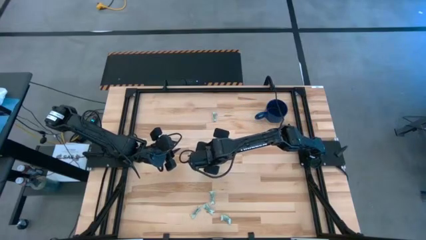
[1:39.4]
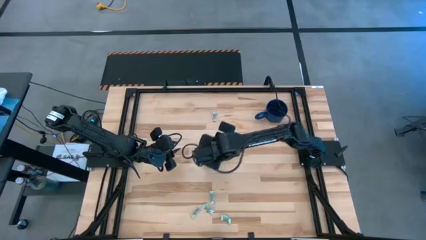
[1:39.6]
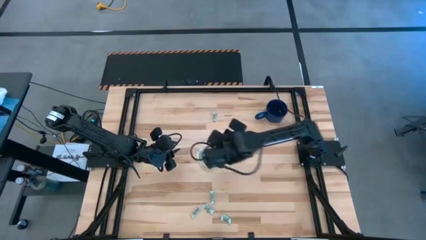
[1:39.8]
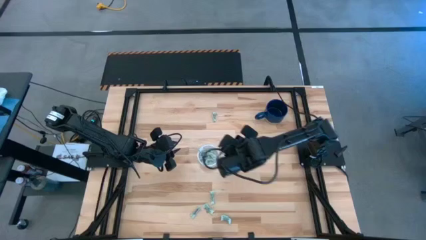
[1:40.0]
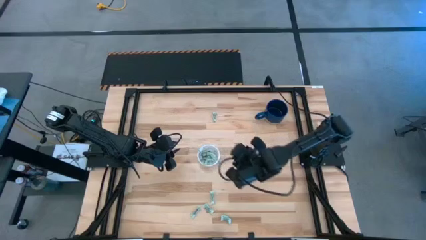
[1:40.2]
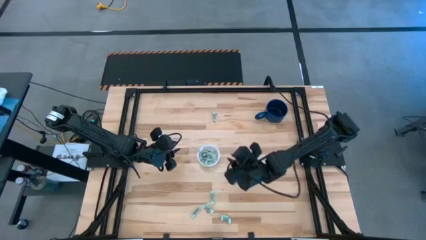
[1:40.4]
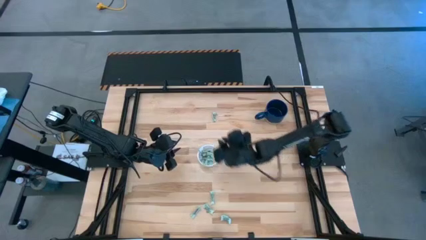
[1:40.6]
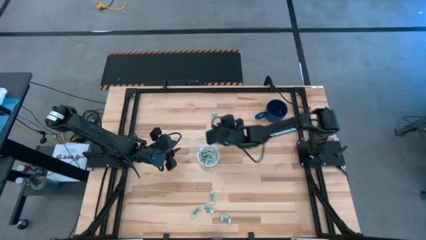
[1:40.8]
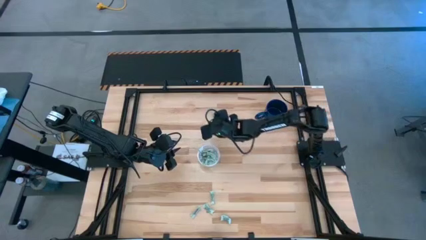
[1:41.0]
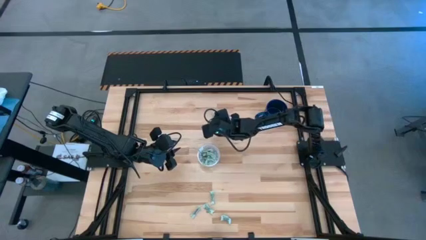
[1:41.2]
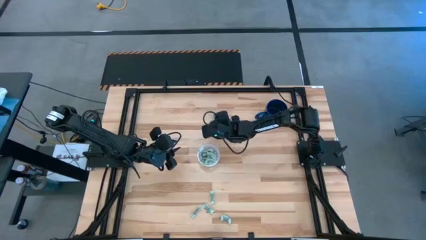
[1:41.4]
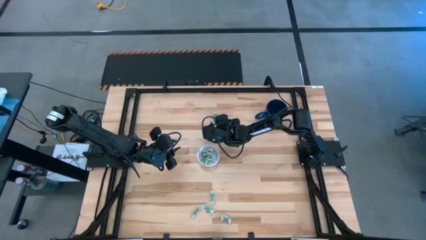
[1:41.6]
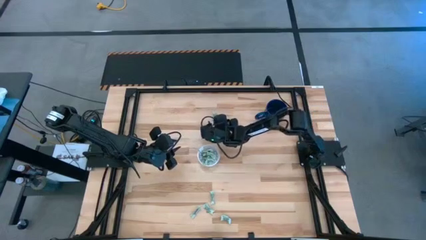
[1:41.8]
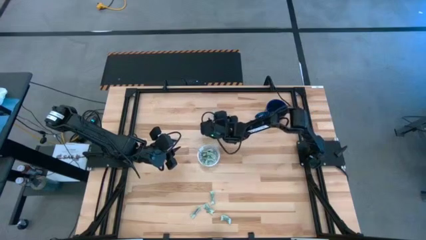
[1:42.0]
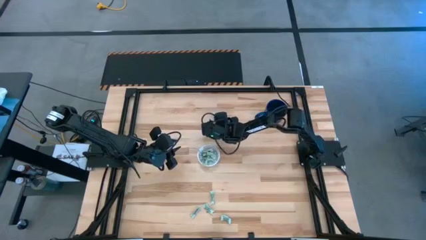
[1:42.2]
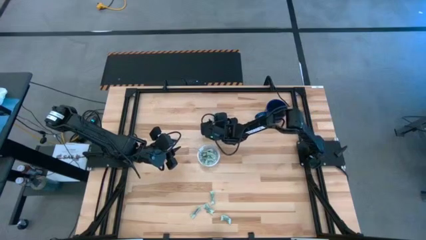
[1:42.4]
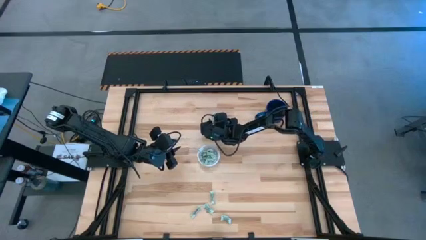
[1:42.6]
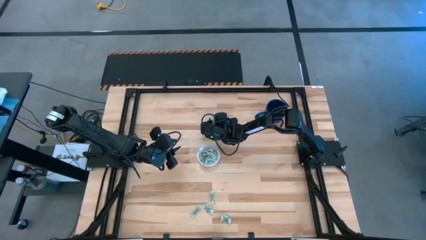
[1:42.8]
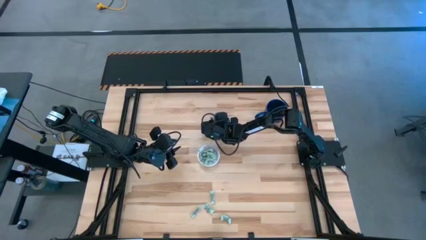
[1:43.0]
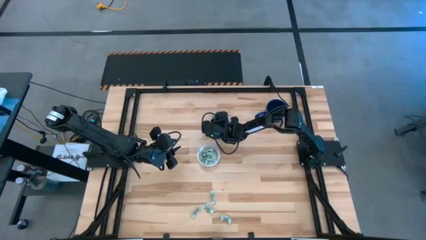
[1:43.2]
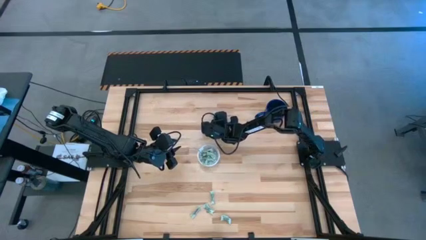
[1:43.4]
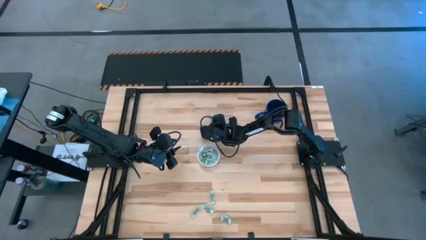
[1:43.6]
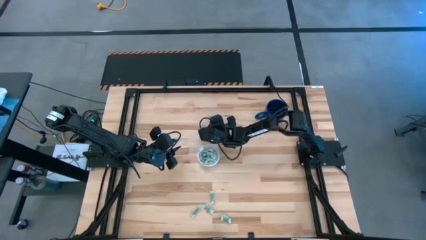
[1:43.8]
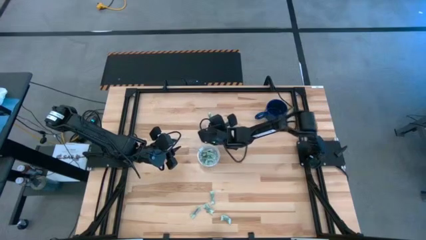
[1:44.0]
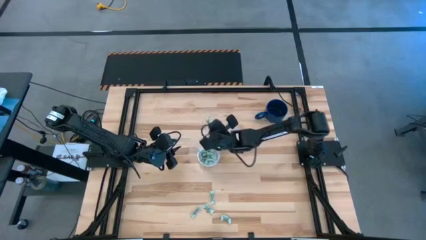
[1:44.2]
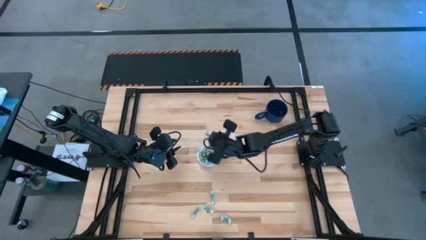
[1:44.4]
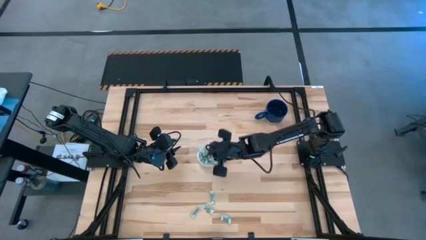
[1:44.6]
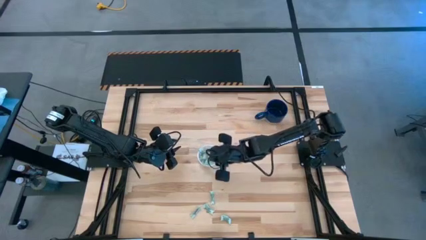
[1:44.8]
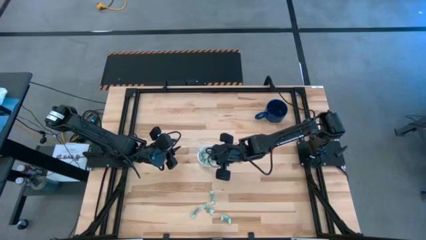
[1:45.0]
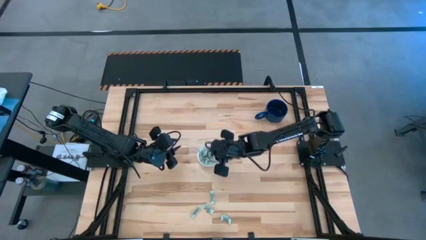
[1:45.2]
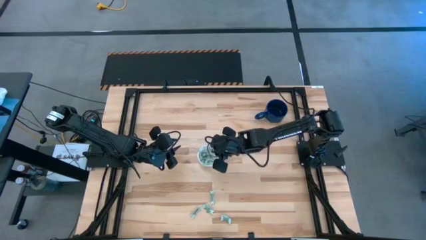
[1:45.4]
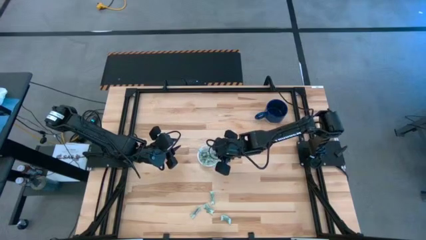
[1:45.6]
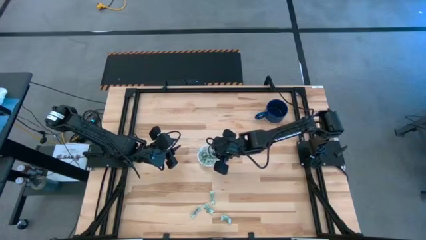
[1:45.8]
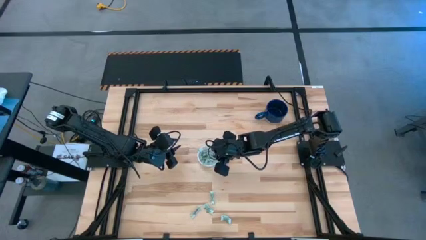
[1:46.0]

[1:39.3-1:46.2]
Task: Pick and place items into bin
Put the stevia packet into the transparent bin

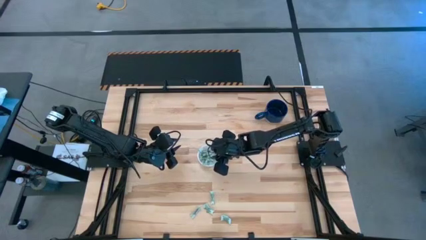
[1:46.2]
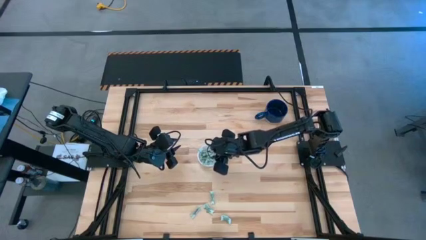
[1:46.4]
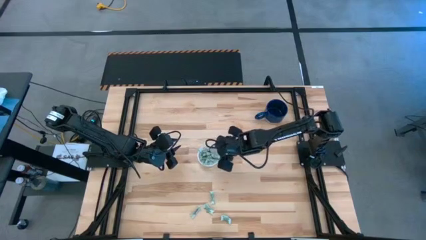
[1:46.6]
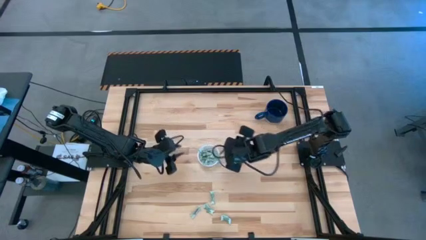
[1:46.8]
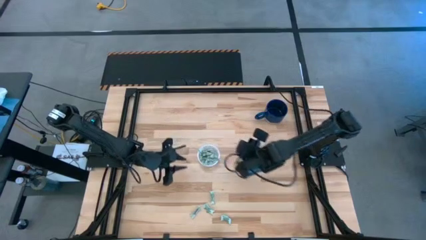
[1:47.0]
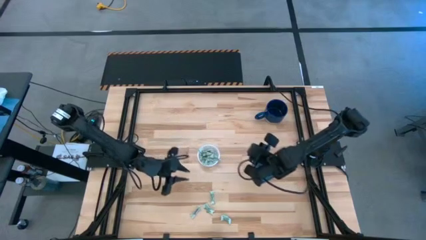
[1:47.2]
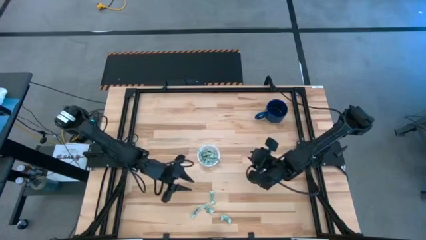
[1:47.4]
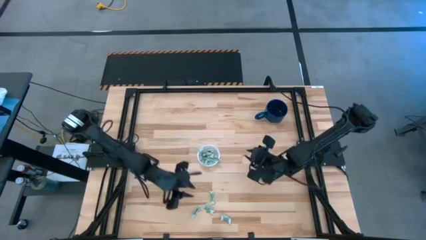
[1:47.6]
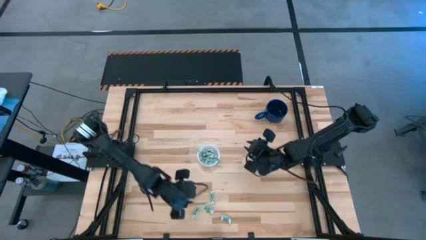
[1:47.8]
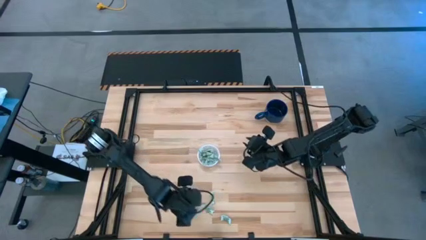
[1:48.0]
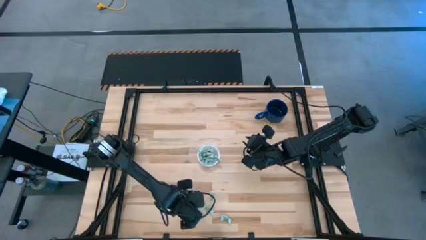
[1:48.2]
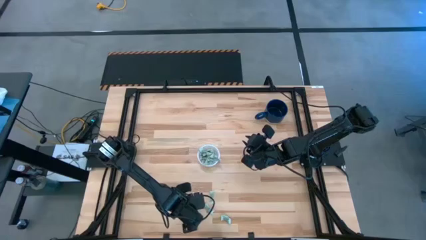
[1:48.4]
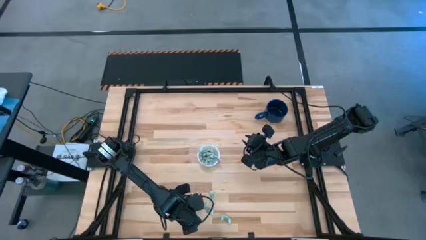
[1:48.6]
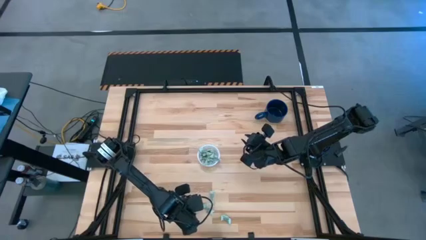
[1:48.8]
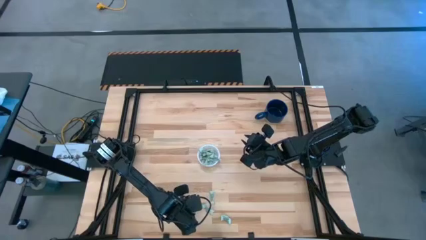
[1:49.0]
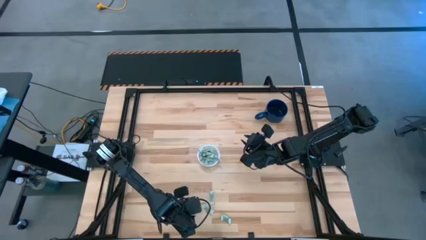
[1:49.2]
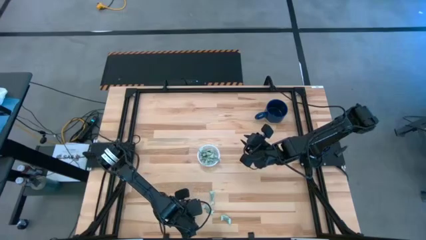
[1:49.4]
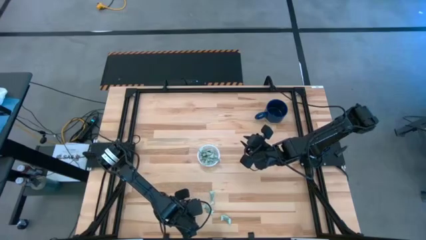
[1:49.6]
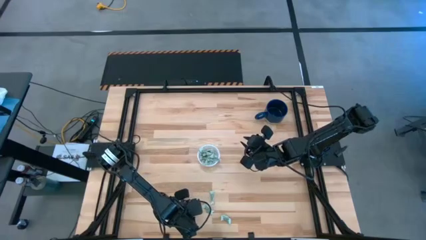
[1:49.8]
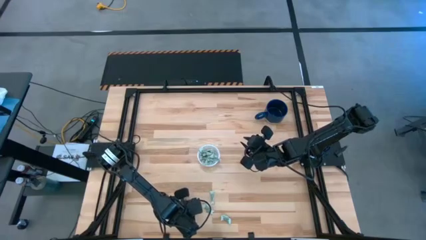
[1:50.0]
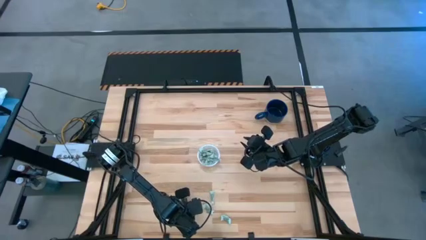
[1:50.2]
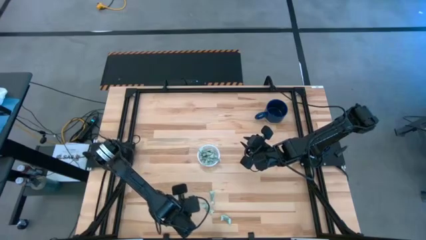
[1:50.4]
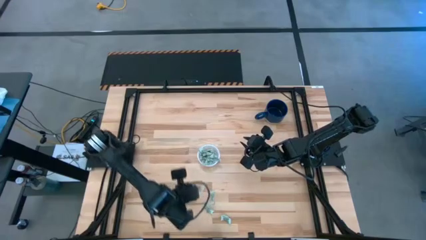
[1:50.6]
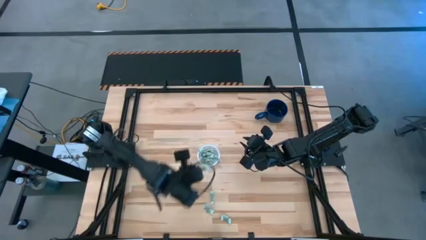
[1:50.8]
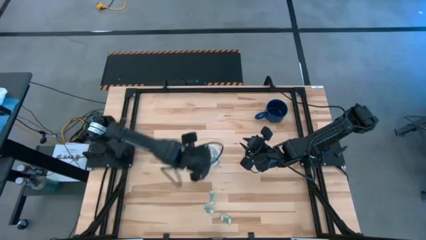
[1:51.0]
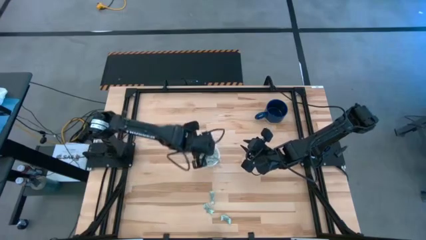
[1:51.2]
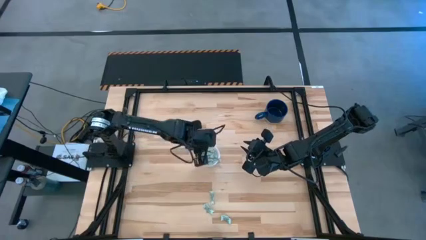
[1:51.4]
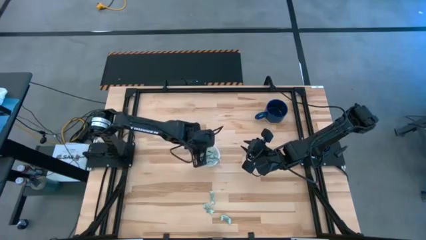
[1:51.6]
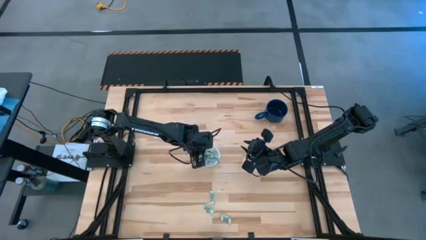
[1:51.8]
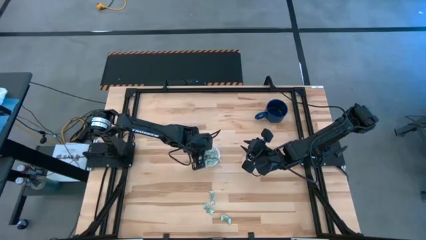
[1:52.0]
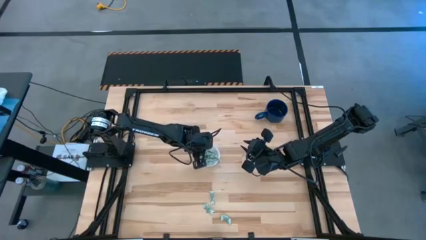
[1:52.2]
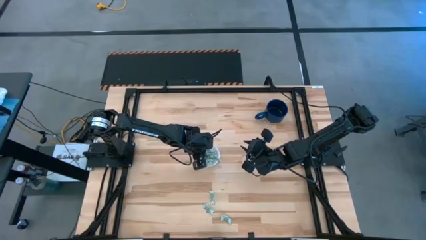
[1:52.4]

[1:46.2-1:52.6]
Put the stevia packet into the transparent bin

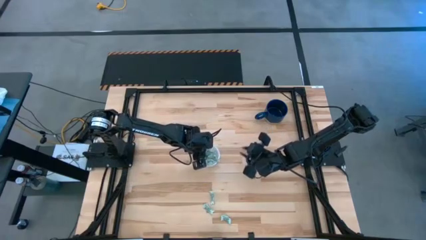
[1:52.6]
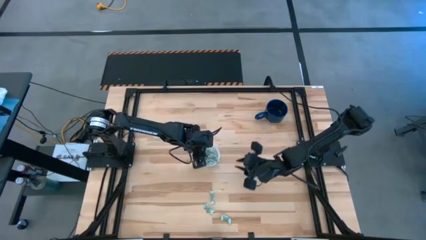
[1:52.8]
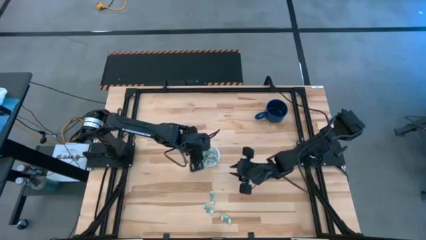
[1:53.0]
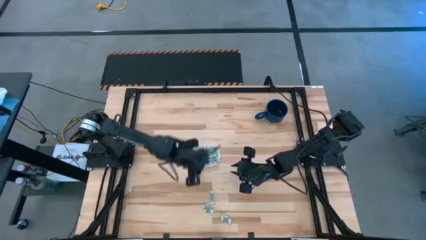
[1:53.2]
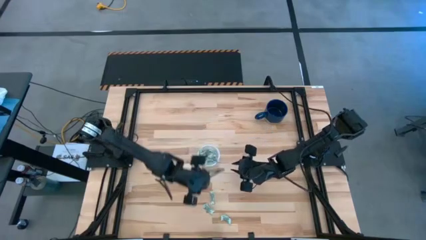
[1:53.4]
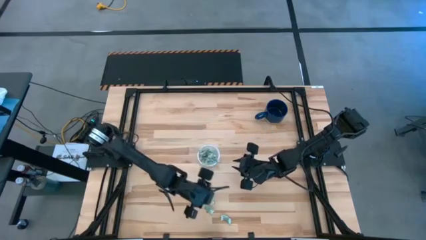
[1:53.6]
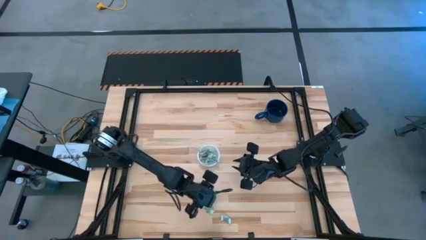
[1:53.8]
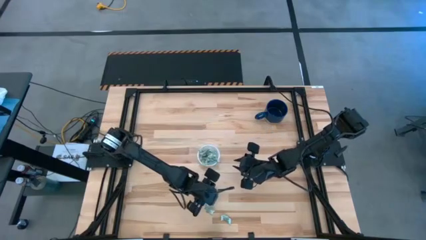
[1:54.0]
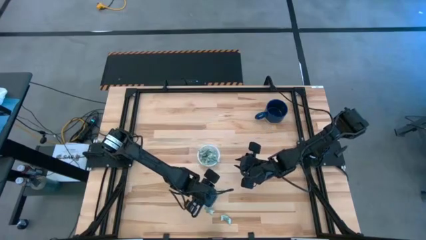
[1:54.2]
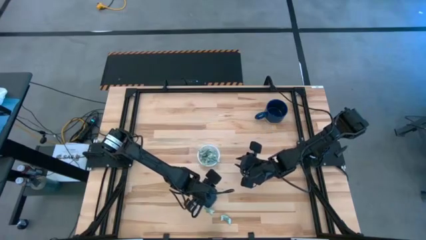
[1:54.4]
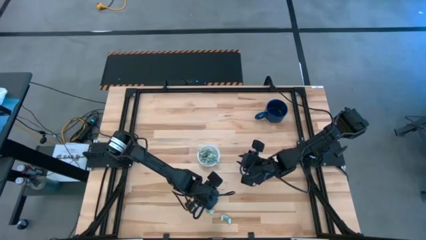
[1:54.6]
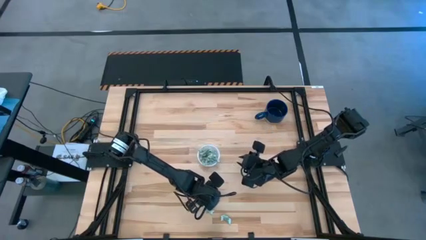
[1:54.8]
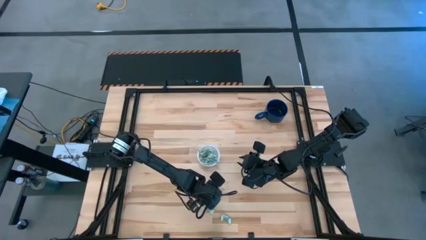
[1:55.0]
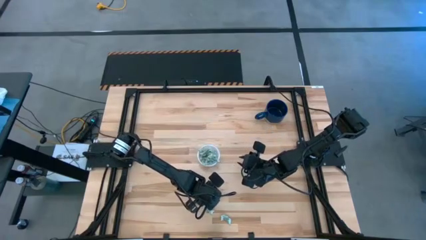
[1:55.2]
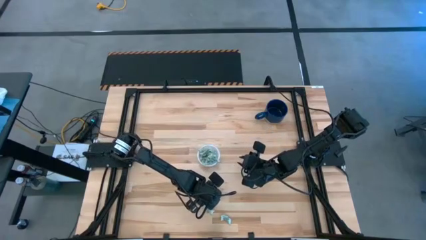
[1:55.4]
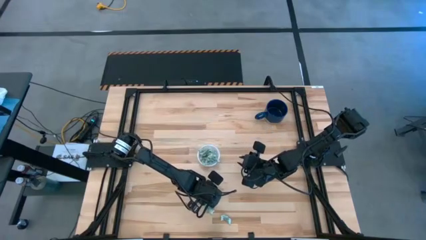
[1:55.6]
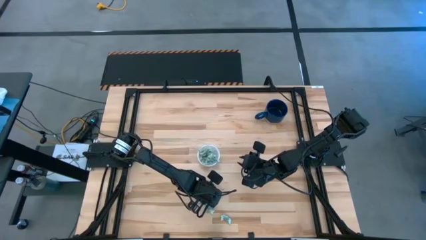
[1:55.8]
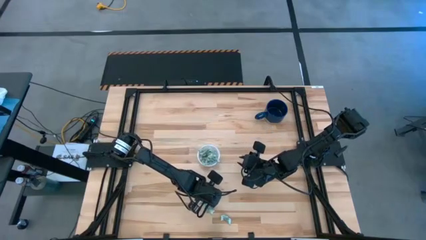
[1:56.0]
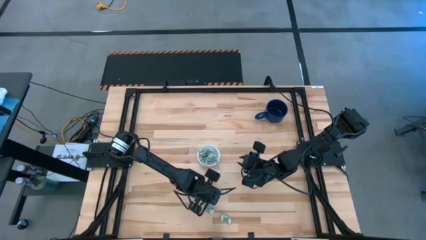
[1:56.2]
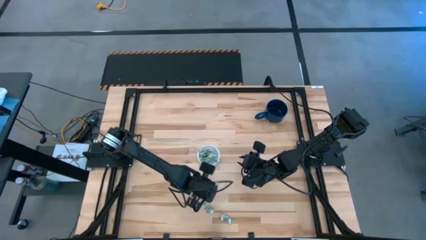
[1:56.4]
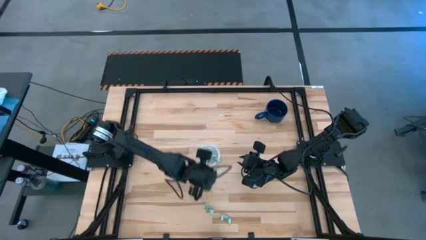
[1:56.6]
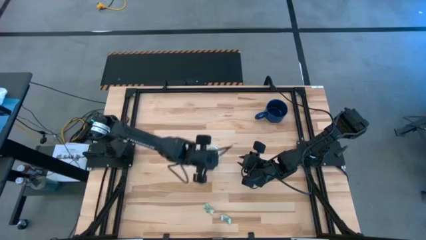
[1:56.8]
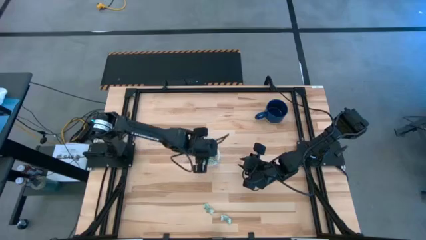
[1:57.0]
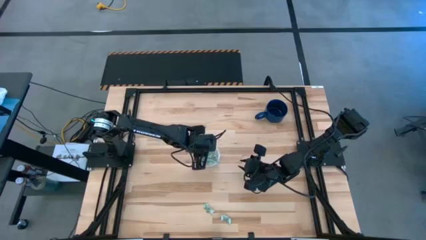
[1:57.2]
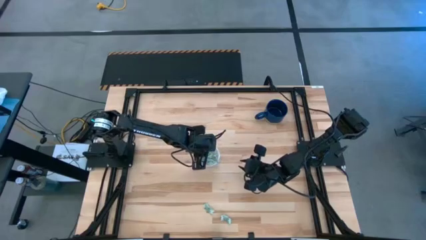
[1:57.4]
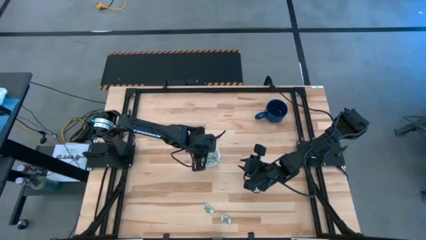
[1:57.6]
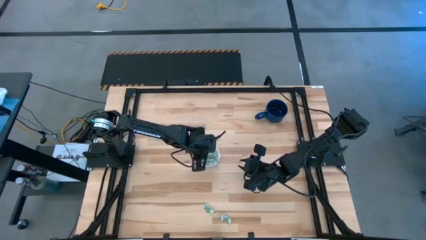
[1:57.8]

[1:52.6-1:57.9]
Put the stevia packet into the transparent bin
